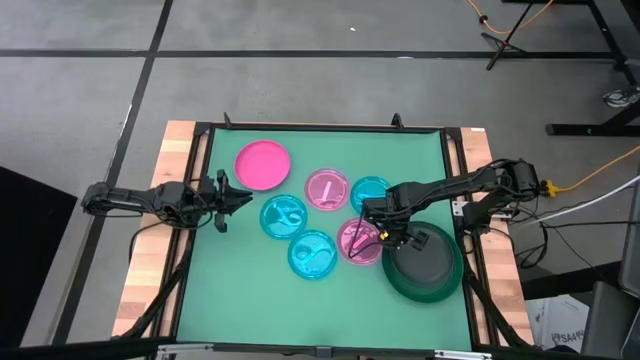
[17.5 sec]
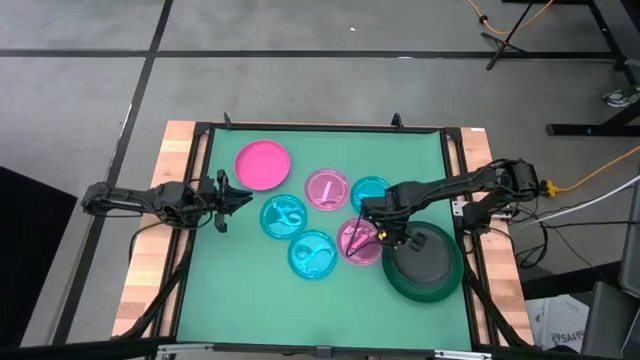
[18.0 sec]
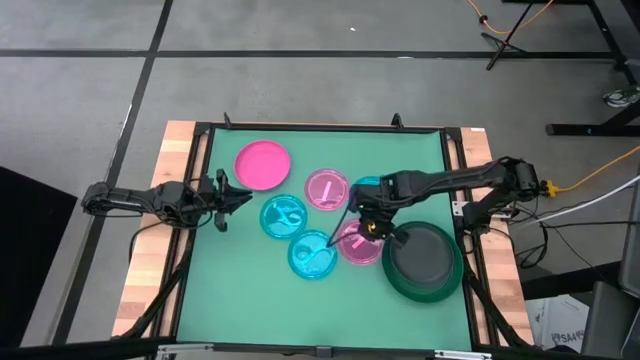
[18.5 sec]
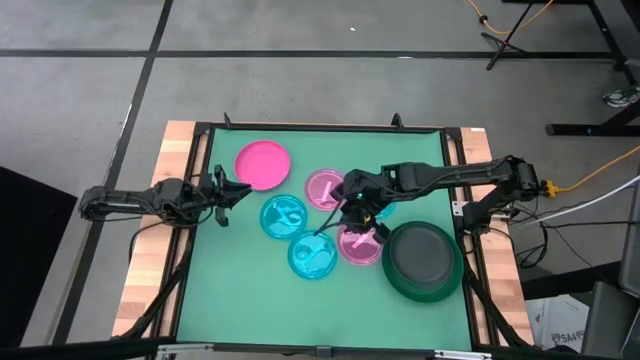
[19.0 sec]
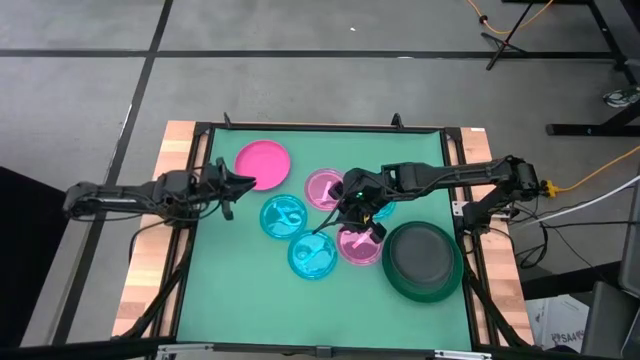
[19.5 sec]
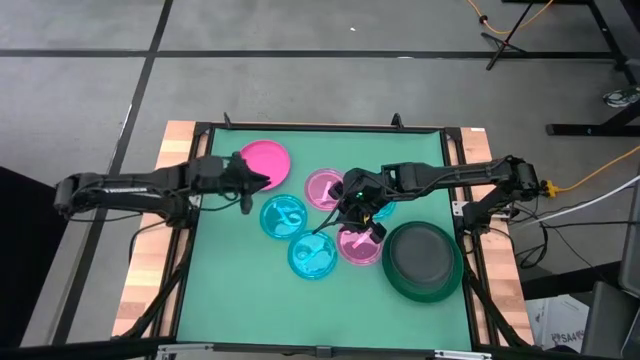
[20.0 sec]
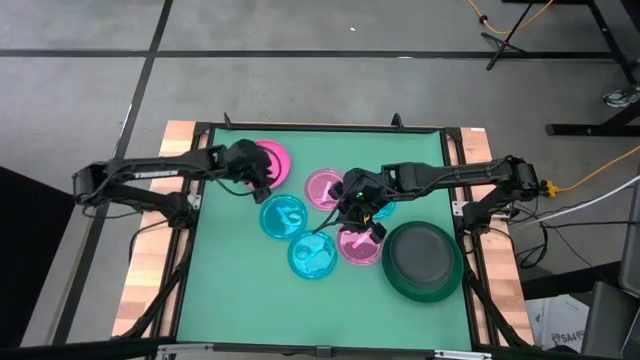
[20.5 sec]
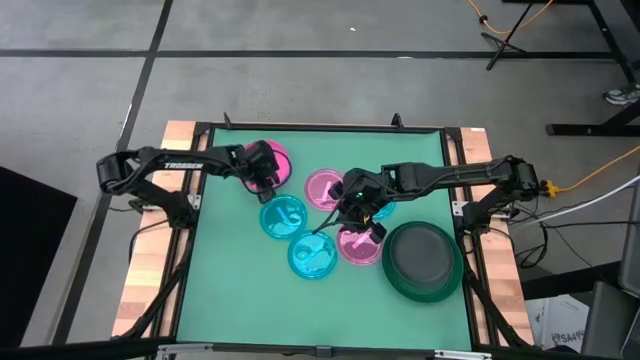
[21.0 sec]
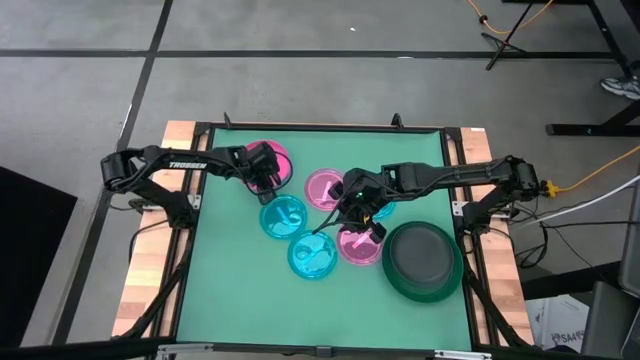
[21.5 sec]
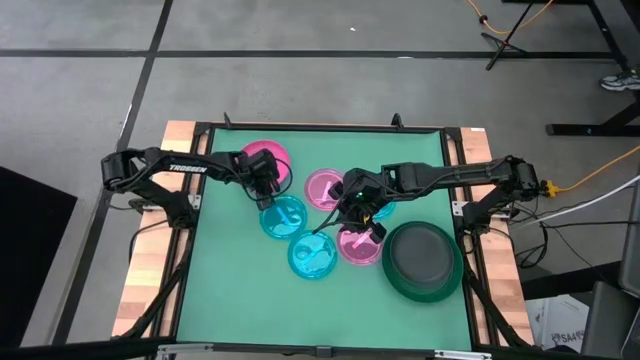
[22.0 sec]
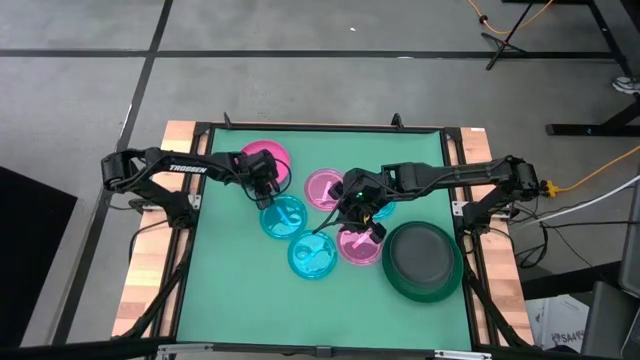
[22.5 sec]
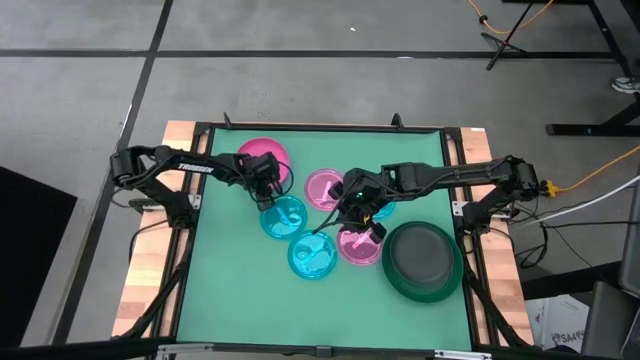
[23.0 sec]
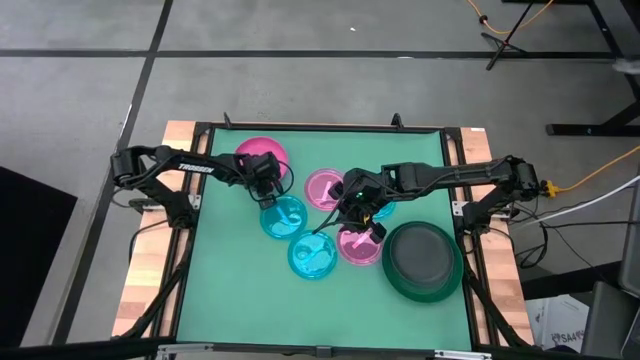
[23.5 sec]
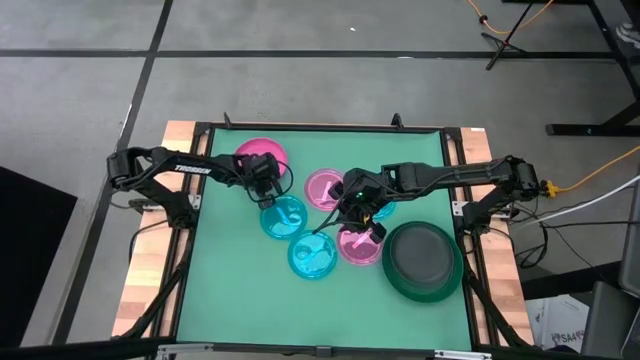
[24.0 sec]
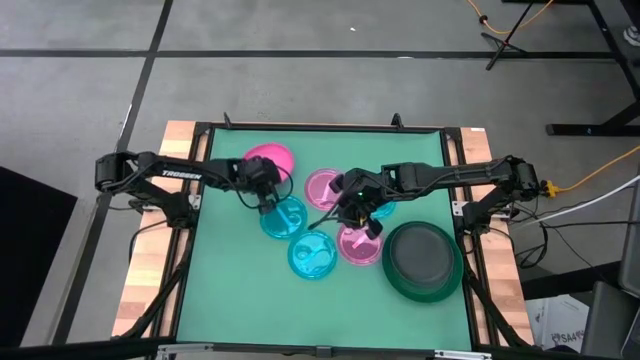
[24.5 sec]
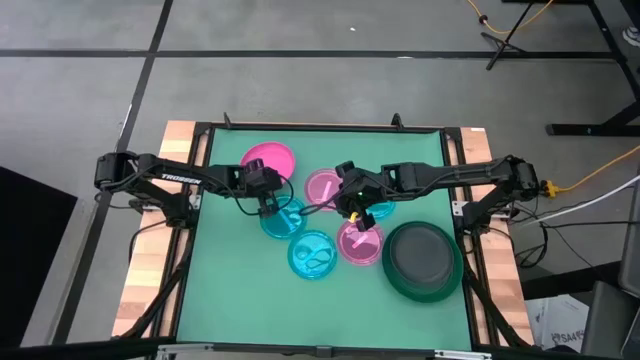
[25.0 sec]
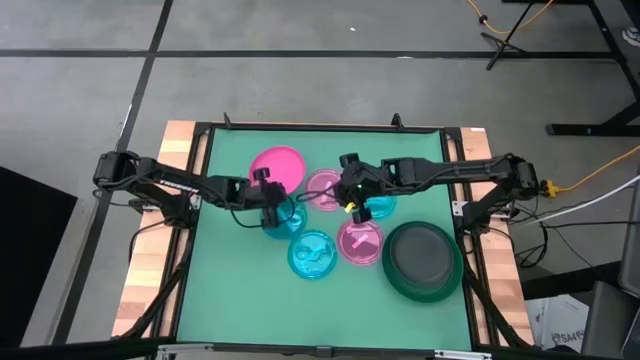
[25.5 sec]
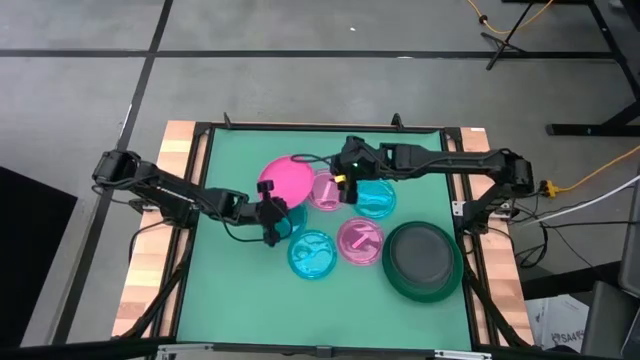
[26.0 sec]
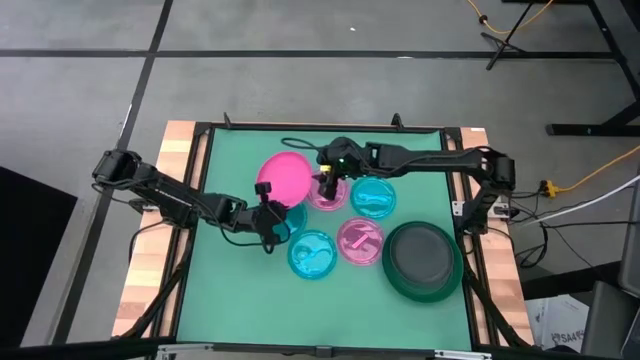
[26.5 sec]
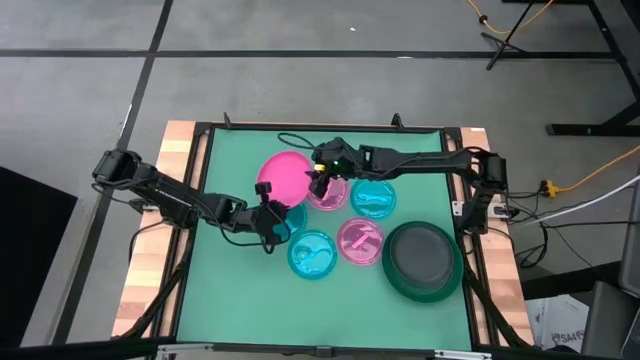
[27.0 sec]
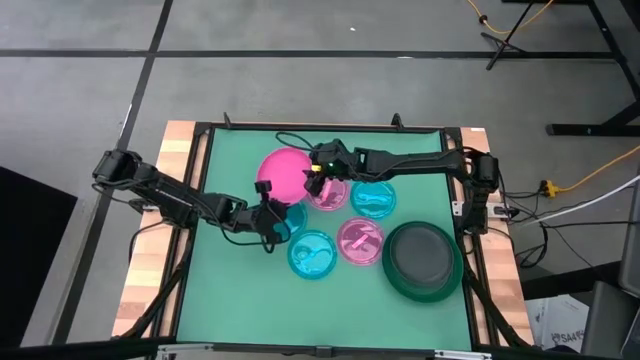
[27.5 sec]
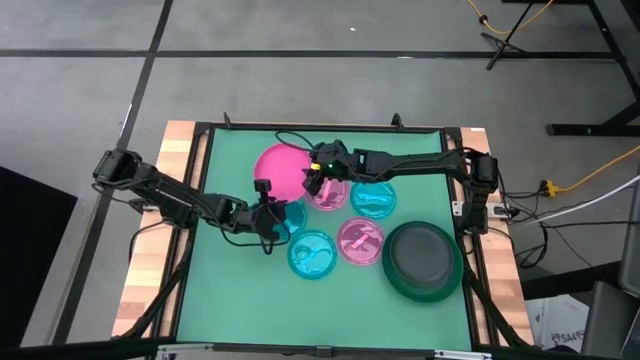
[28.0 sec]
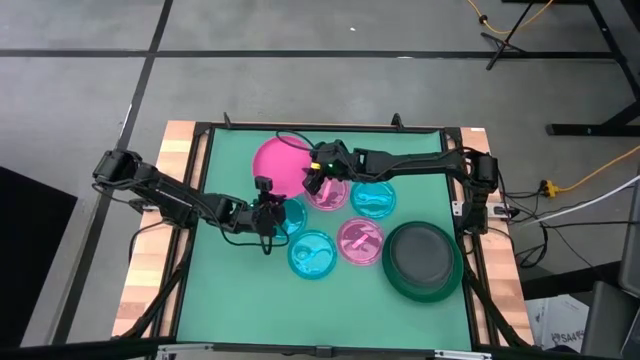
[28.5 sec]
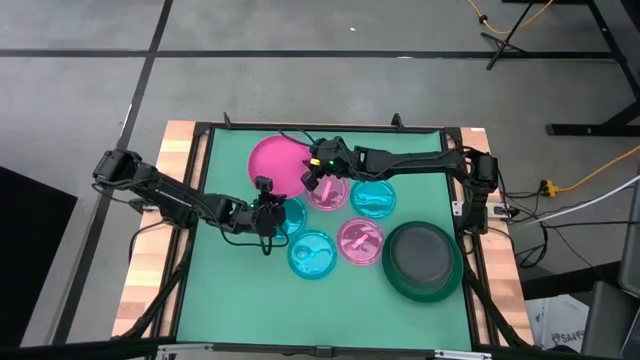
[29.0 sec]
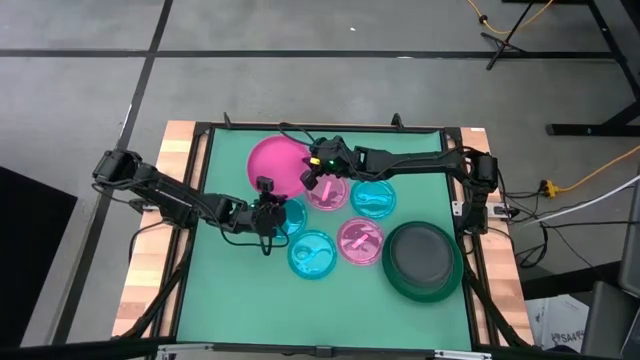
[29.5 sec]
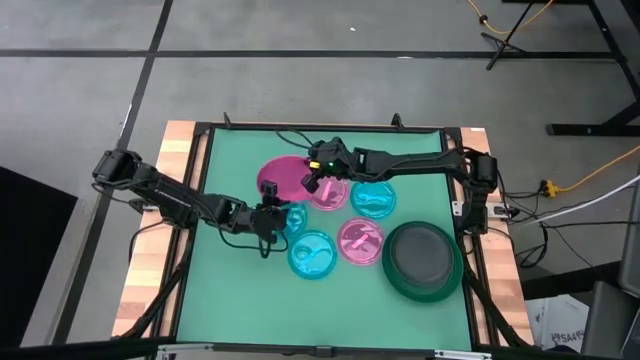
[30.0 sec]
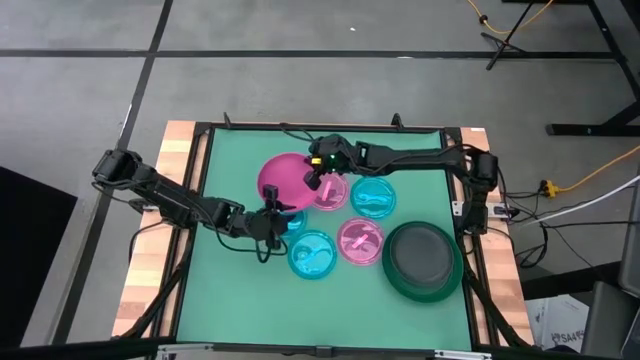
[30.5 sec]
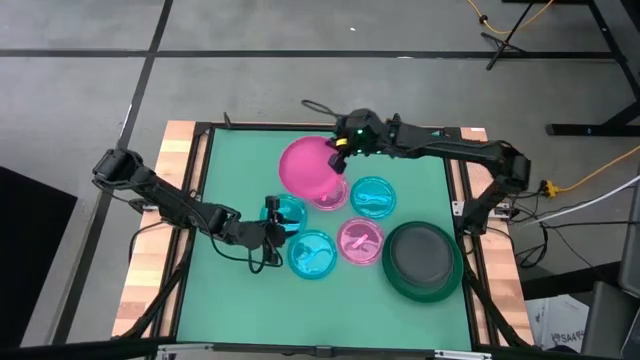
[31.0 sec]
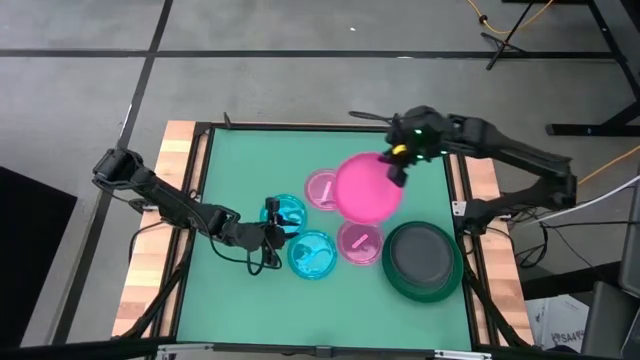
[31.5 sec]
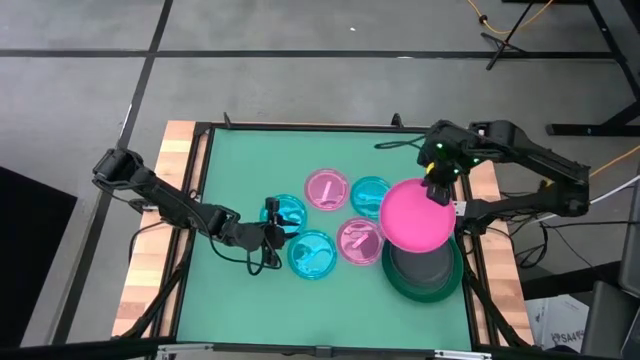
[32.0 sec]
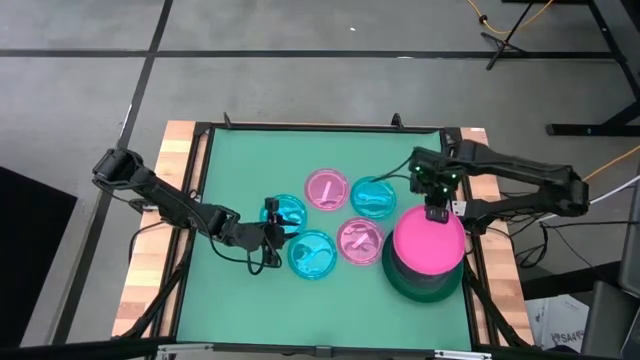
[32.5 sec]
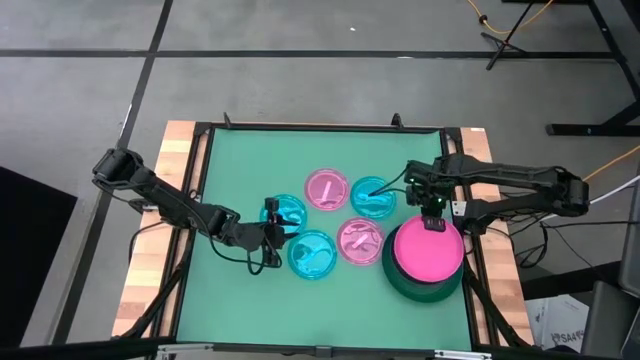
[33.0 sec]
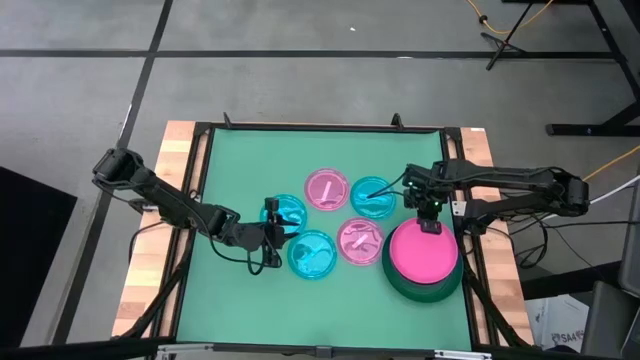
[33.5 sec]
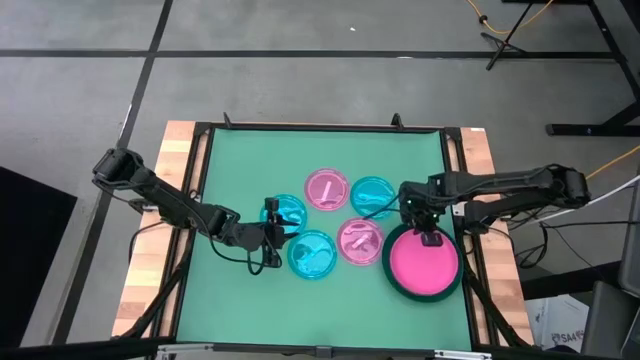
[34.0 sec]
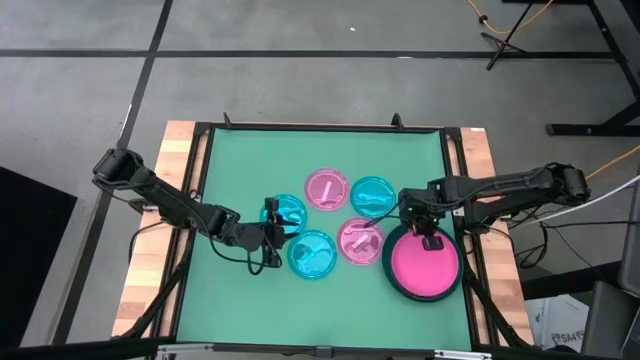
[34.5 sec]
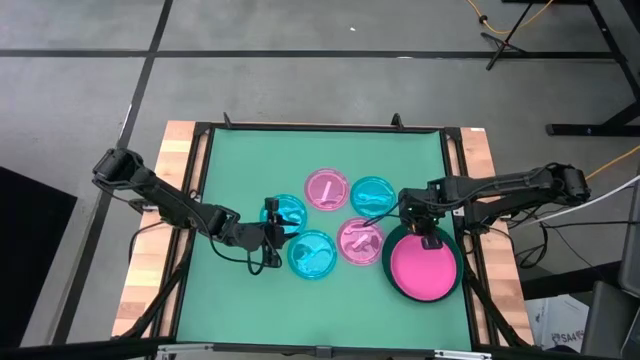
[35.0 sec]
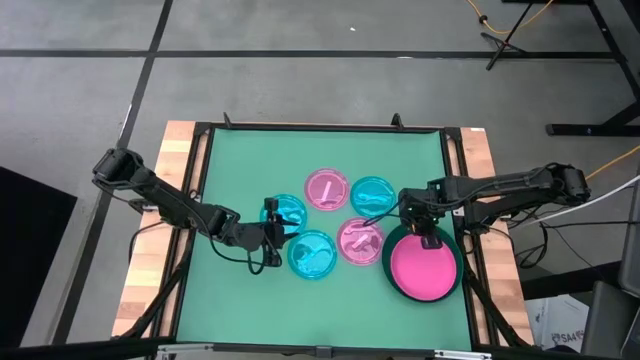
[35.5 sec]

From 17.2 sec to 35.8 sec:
Task: Stack plastic plates
Stack the pink plate on top of the black plate

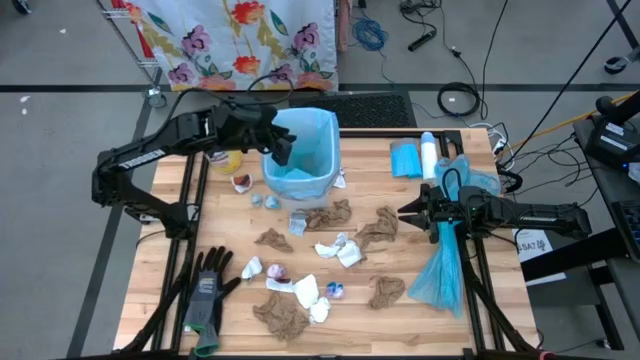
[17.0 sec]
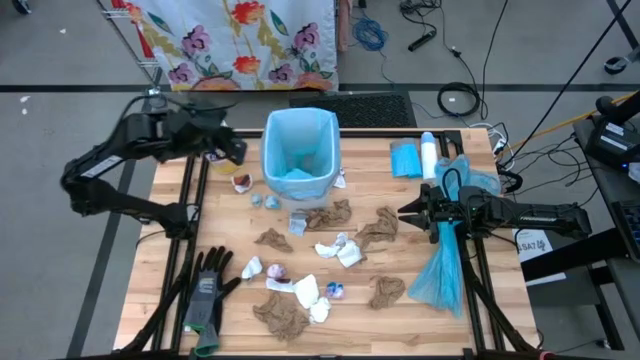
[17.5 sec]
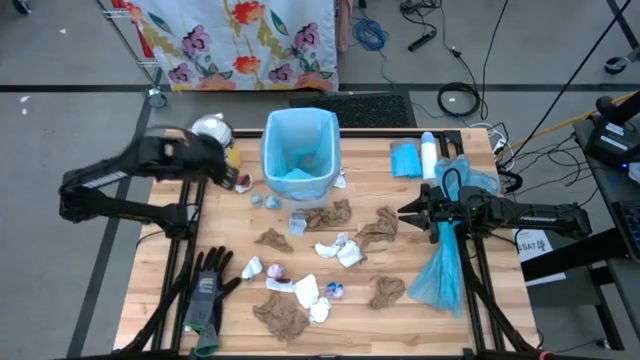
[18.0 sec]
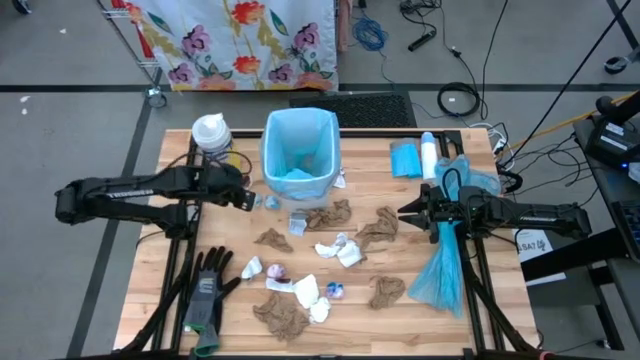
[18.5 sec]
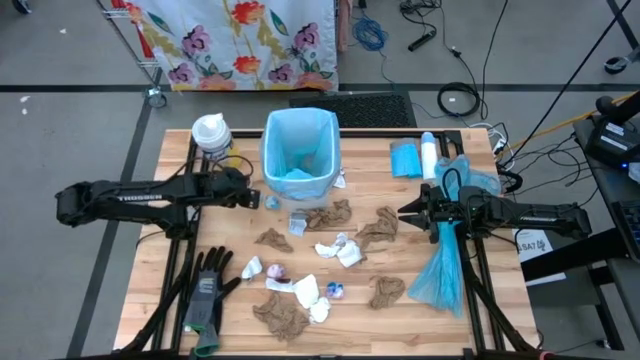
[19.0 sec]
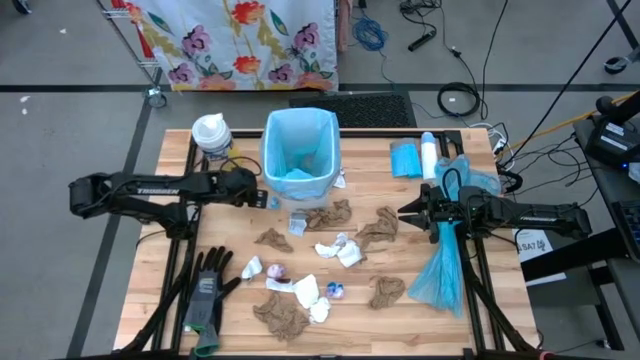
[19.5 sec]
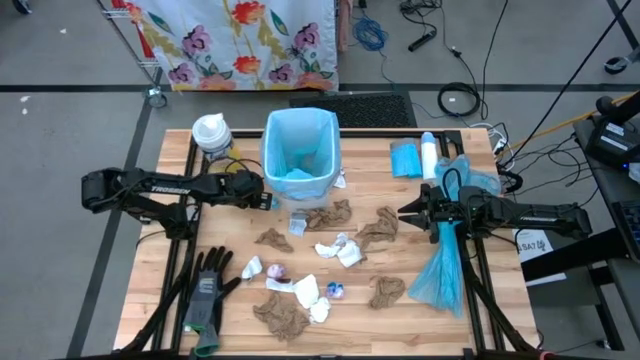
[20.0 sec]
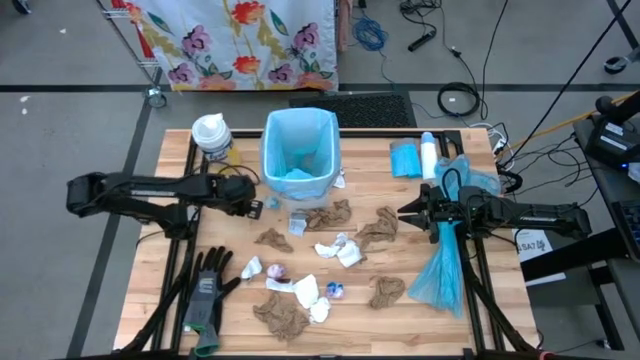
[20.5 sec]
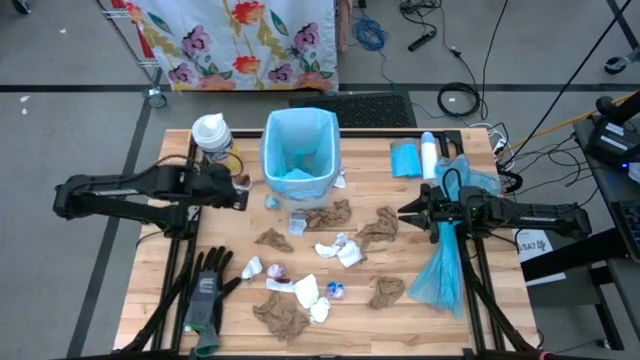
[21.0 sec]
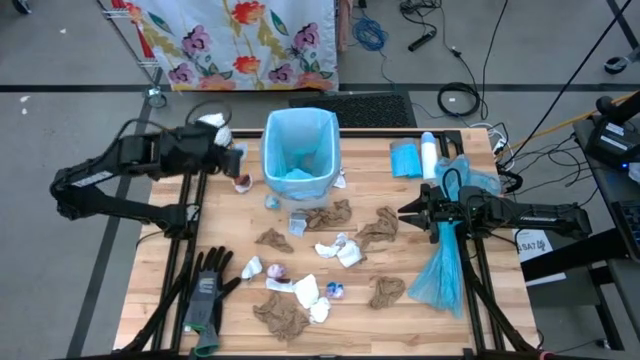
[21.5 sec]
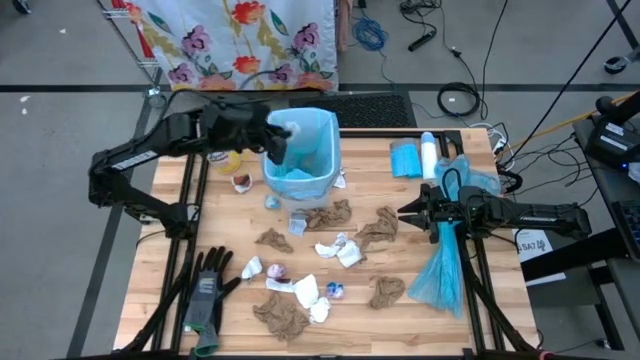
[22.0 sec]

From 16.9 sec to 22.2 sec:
Task: place trash/remove bag and relplace
Put the blue plastic into the trash bin
